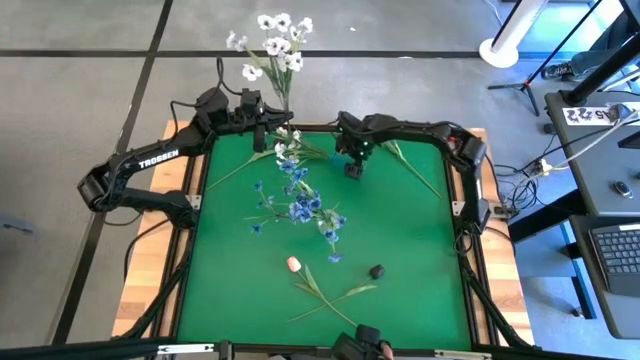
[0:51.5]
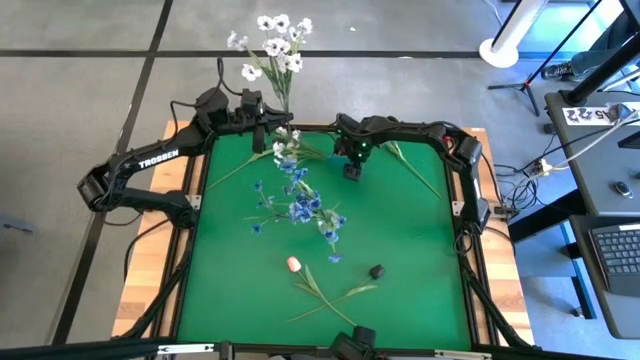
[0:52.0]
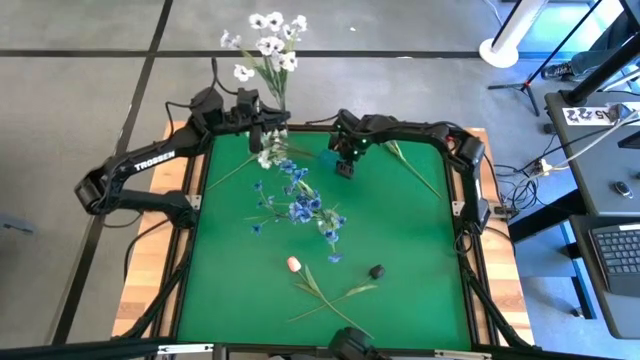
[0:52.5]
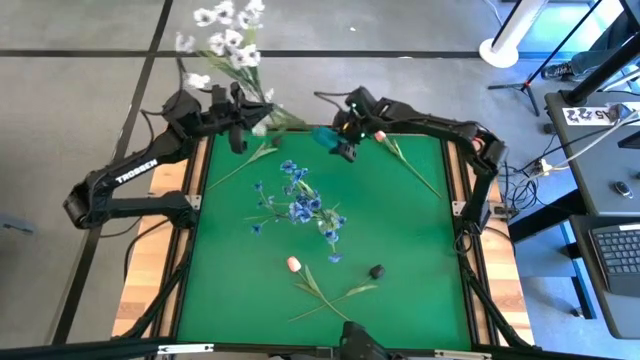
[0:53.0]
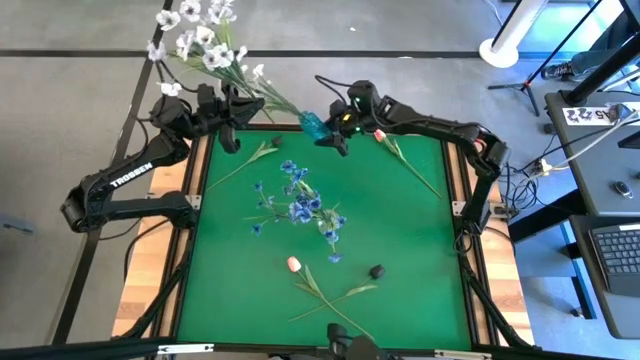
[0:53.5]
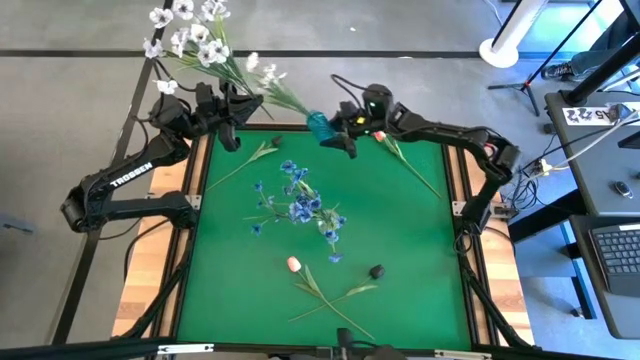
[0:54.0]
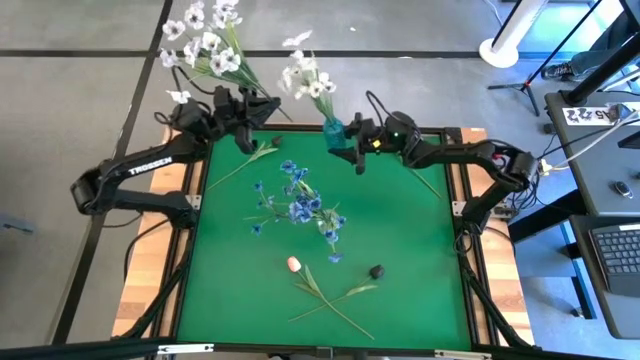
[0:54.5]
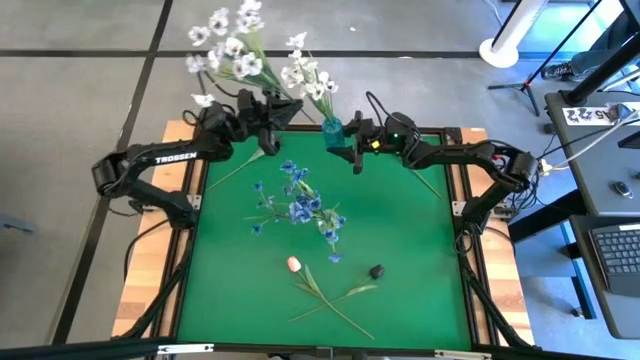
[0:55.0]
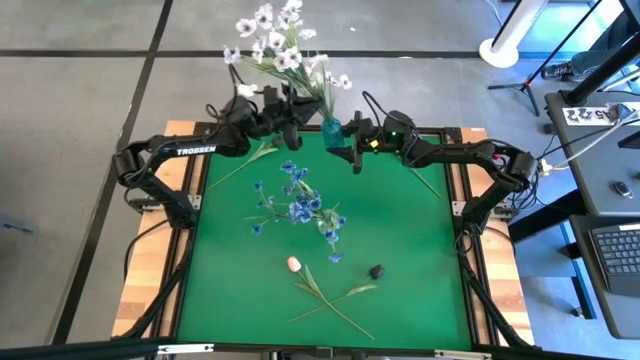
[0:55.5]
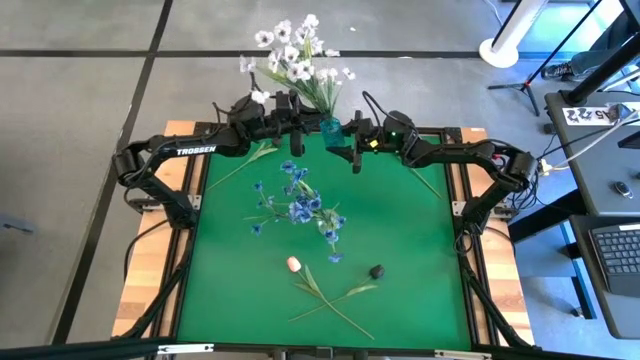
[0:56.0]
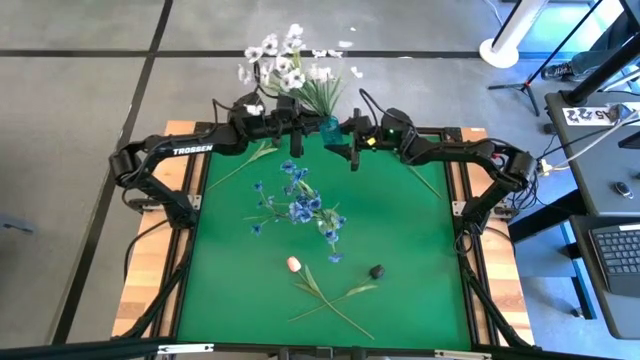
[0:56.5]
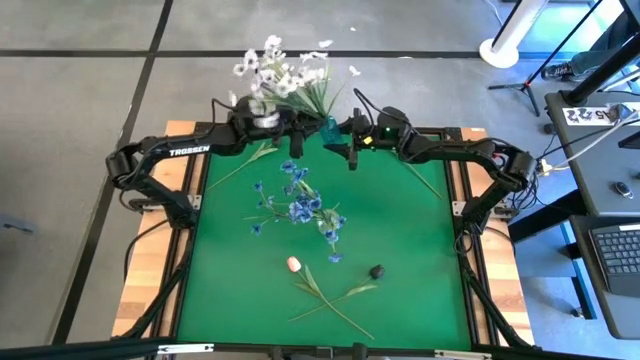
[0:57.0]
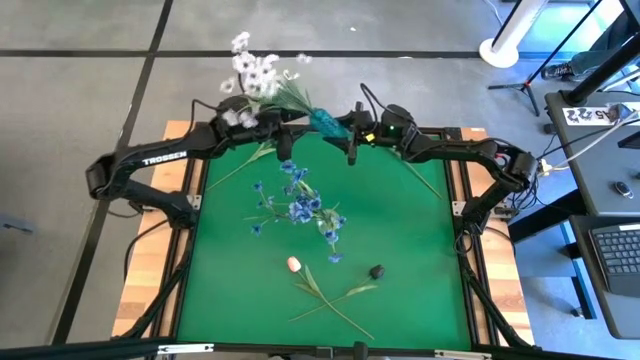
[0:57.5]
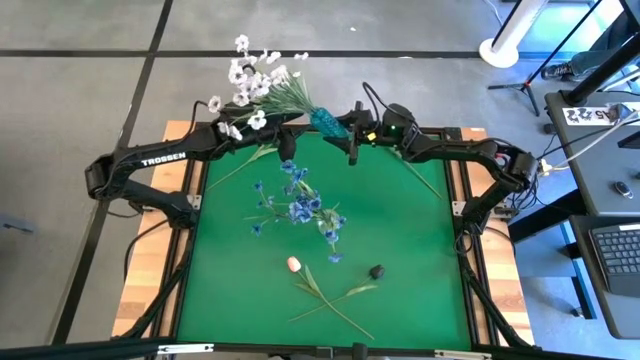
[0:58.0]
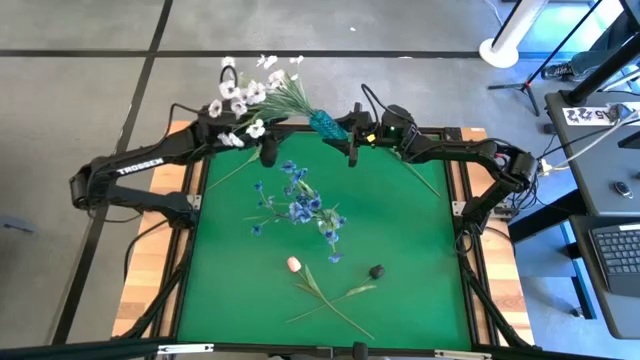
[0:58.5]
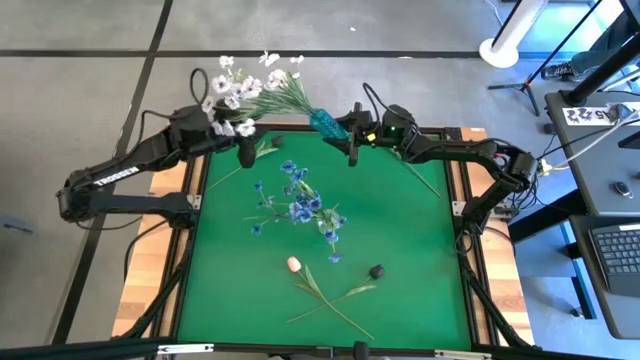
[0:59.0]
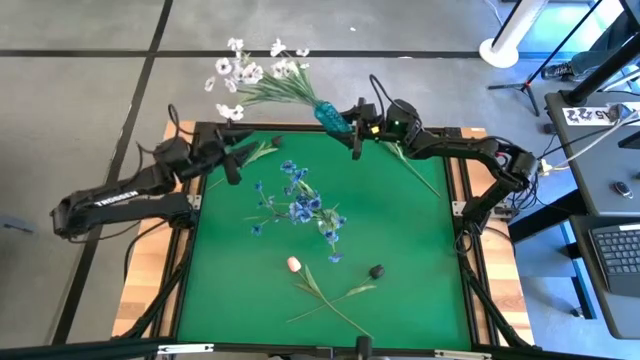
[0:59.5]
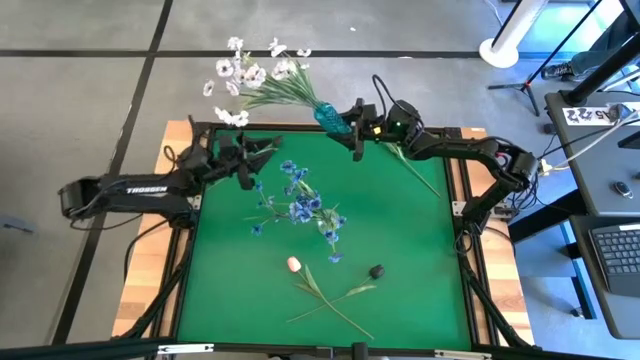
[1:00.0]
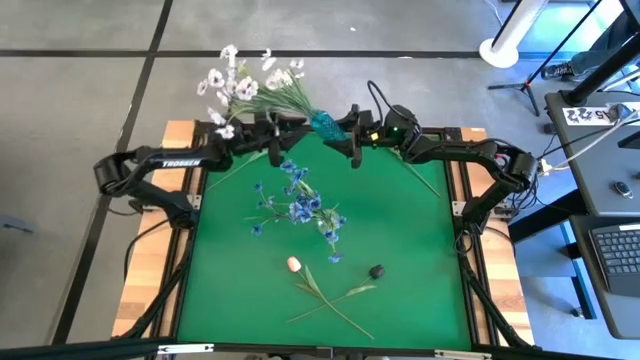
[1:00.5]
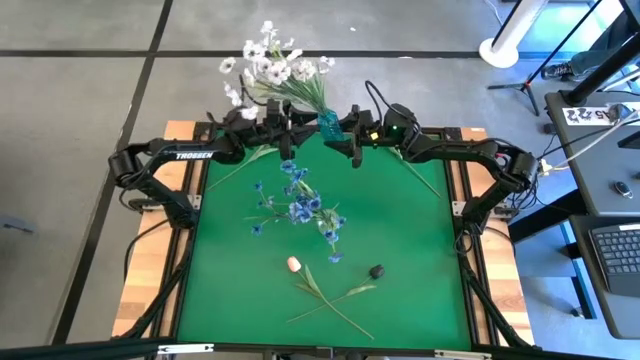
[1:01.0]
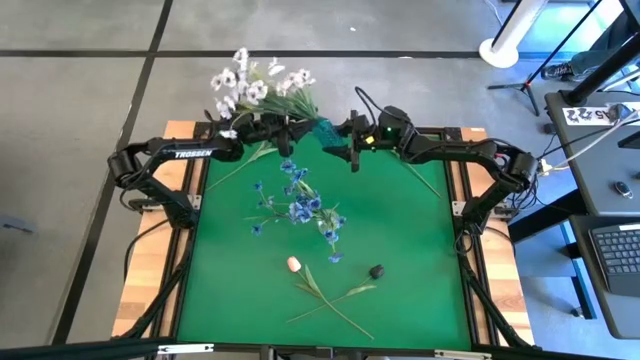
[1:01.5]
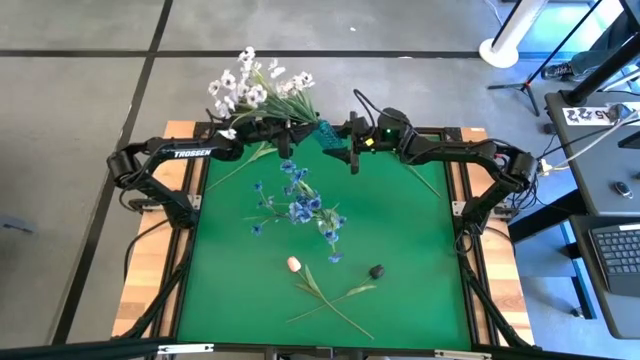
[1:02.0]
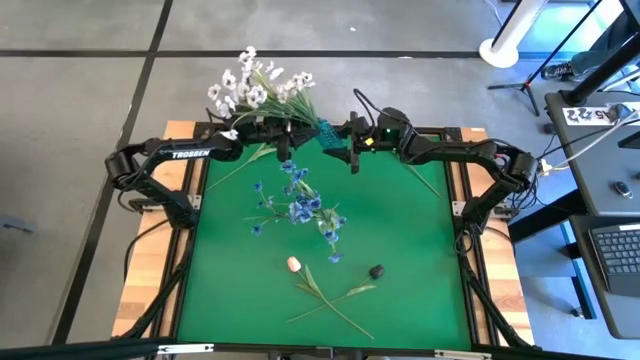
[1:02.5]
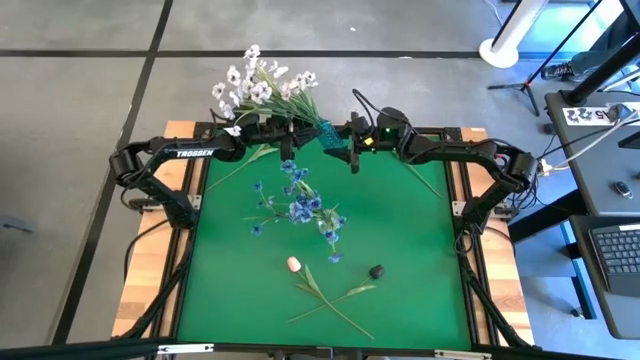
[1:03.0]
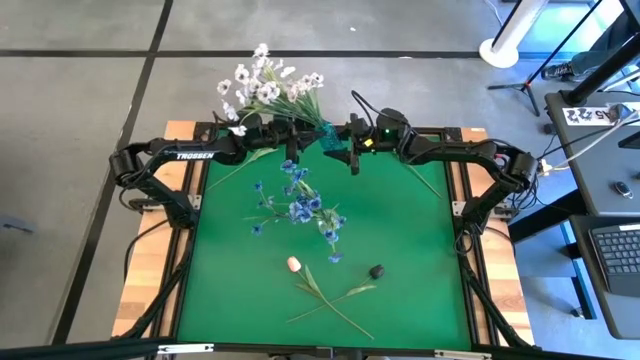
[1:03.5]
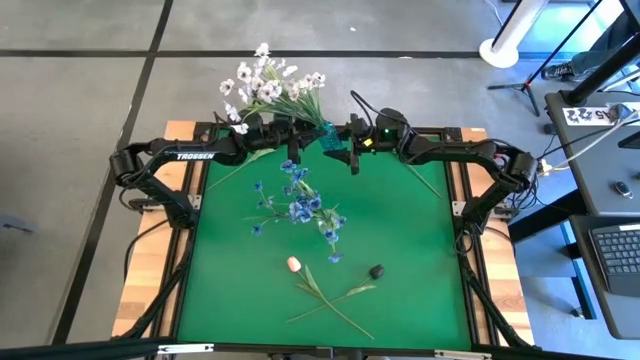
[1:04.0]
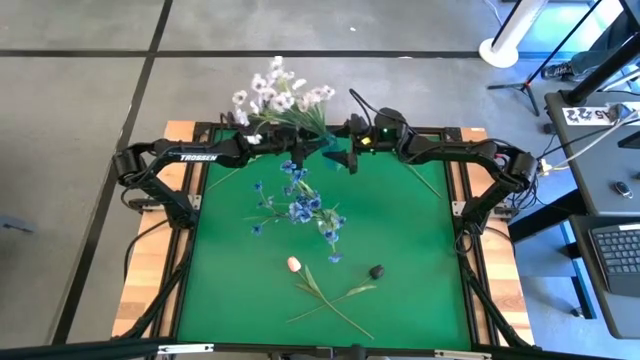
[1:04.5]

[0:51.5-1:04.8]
Task: Sort flowers into vase by color
Put the white flowers into the blue vase

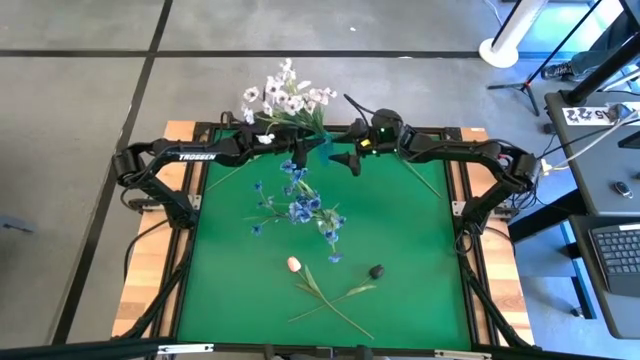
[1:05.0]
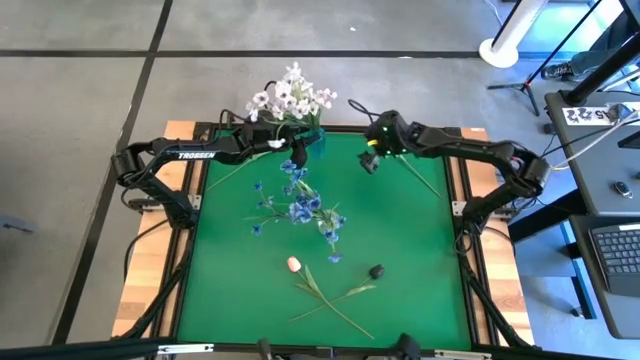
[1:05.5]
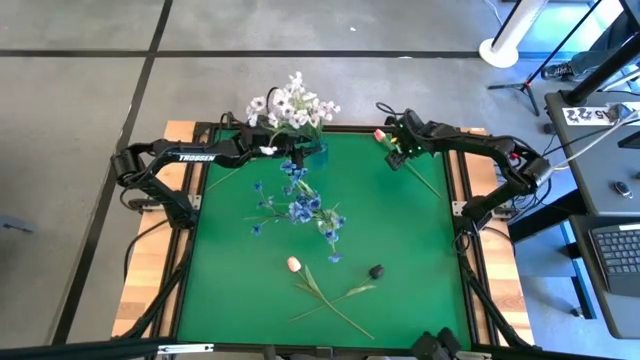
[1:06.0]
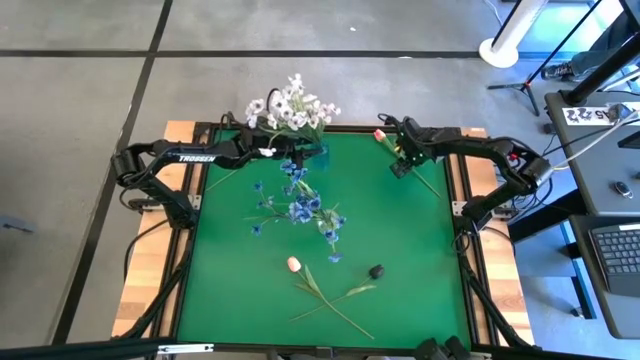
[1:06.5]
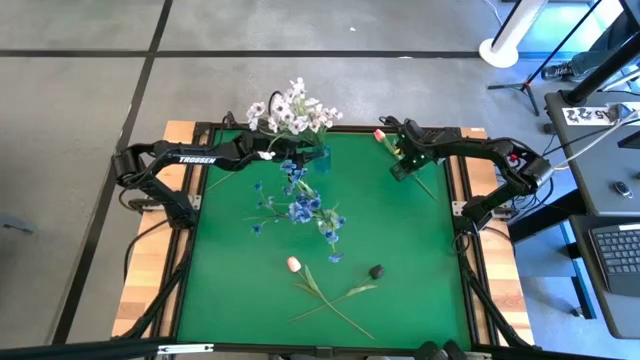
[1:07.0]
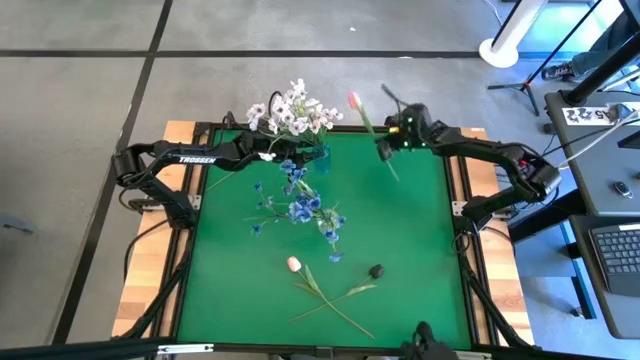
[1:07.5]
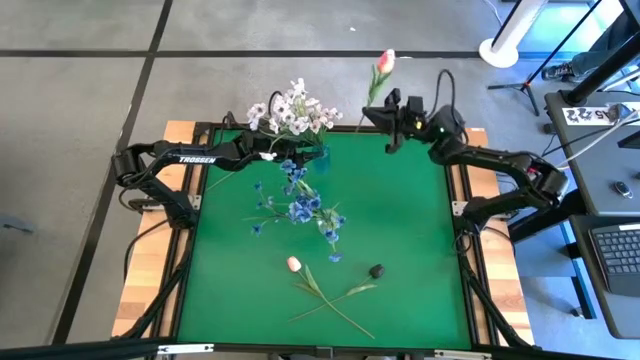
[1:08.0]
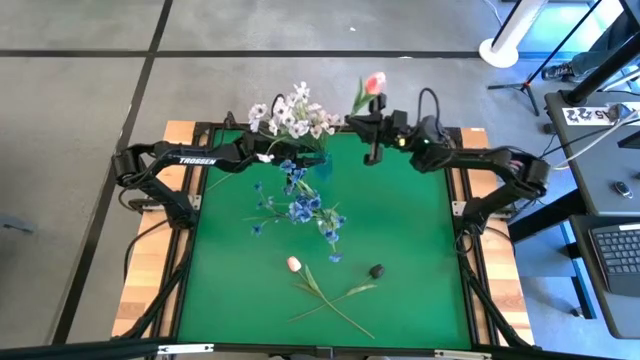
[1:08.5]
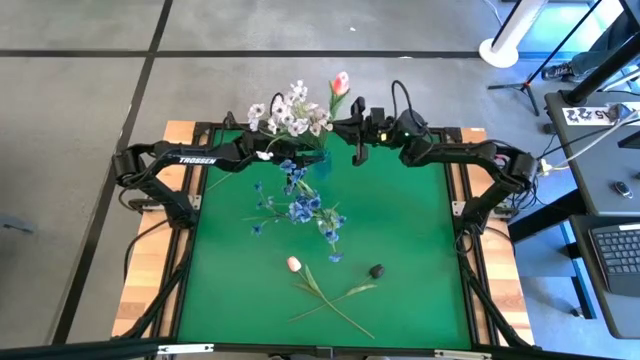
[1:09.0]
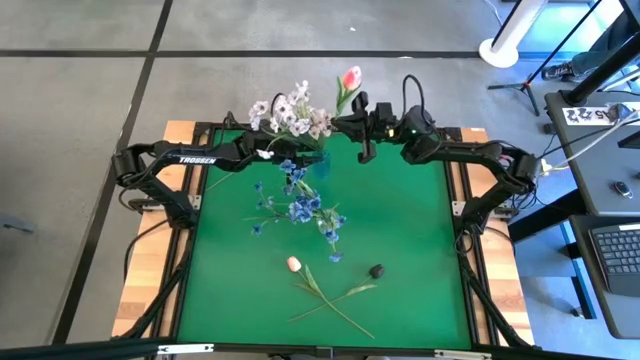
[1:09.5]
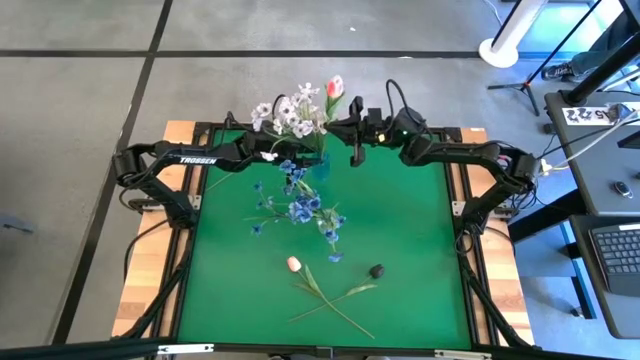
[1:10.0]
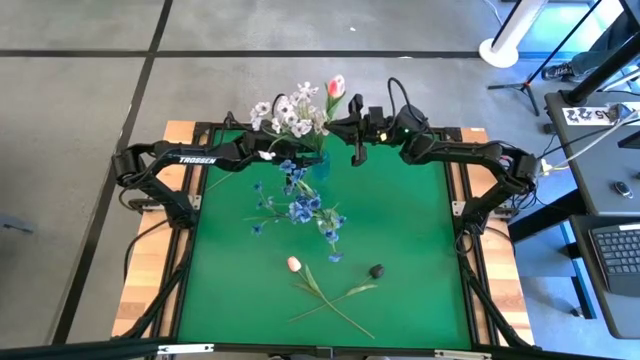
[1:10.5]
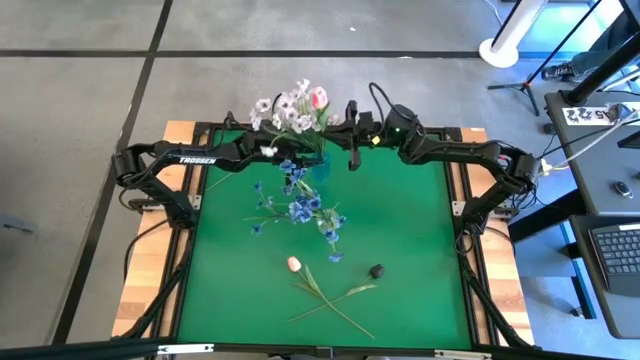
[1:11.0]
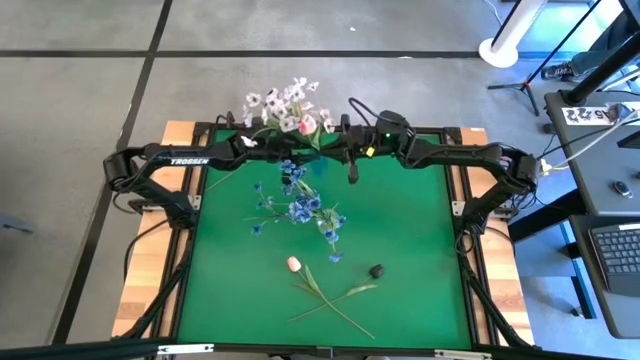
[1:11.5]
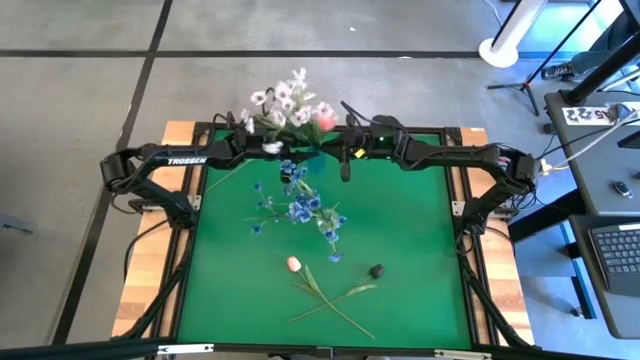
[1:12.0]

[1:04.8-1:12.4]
Put the top right pink flower into the blue vase
